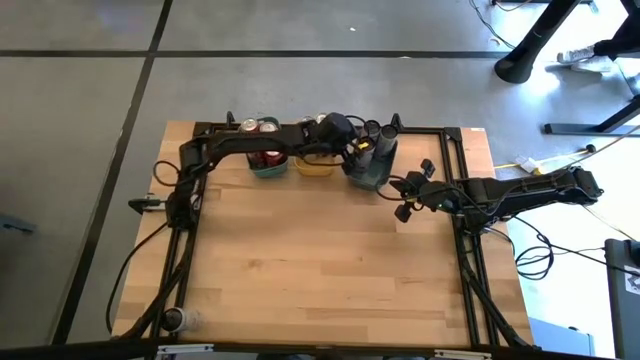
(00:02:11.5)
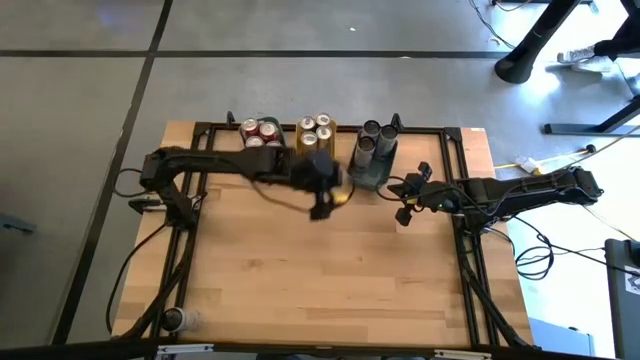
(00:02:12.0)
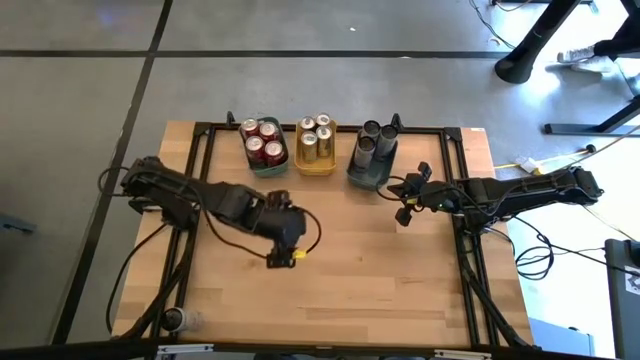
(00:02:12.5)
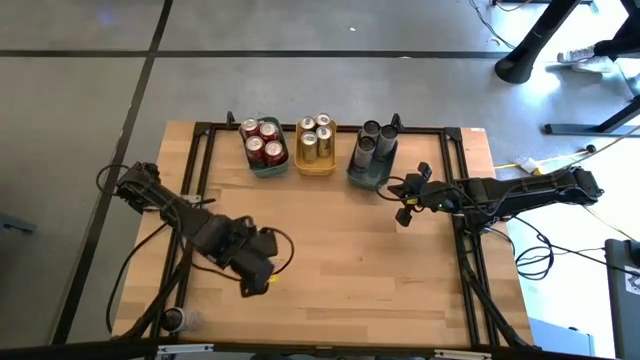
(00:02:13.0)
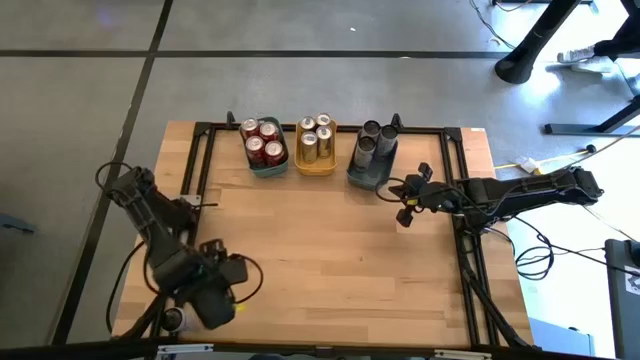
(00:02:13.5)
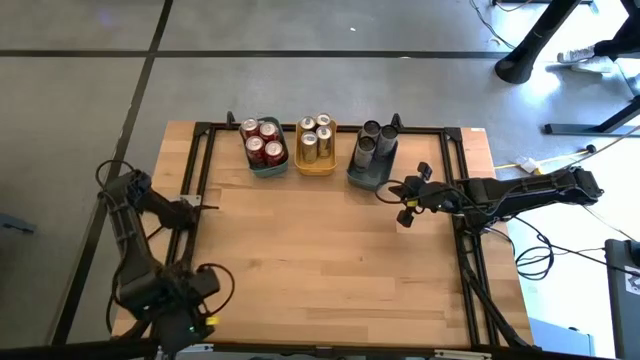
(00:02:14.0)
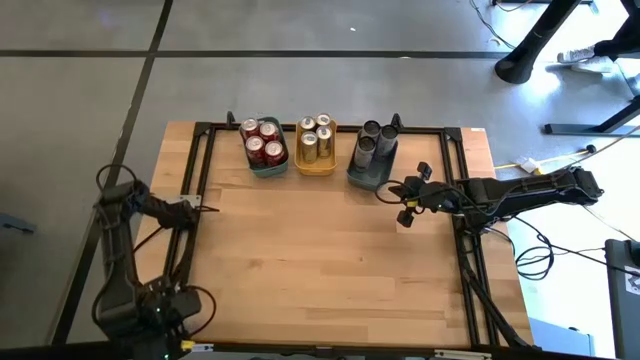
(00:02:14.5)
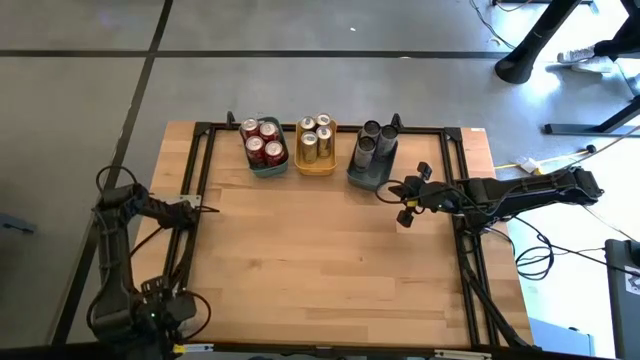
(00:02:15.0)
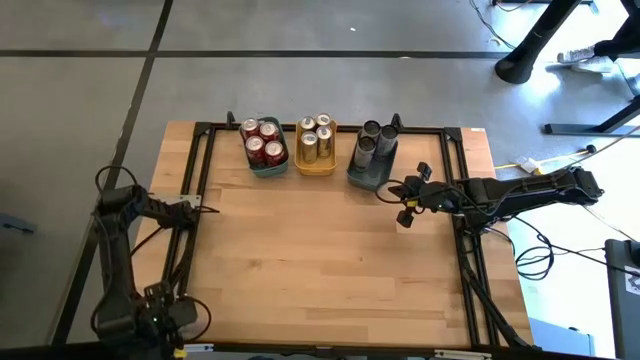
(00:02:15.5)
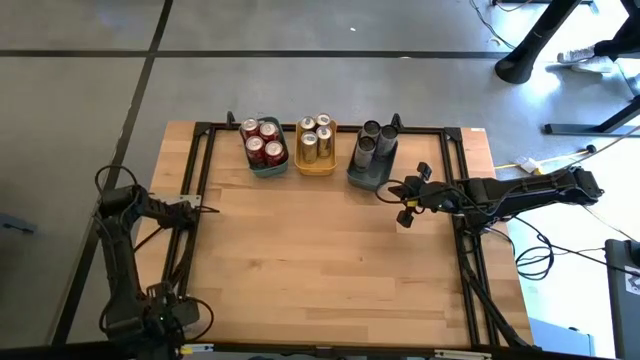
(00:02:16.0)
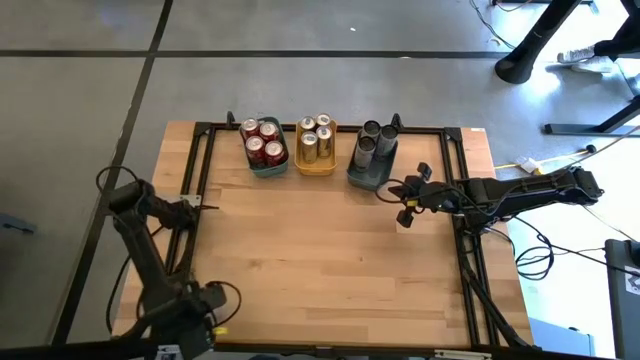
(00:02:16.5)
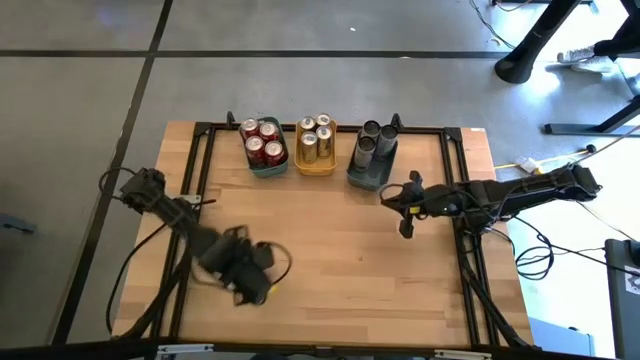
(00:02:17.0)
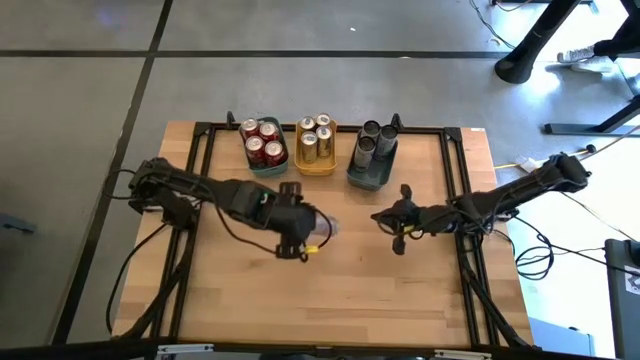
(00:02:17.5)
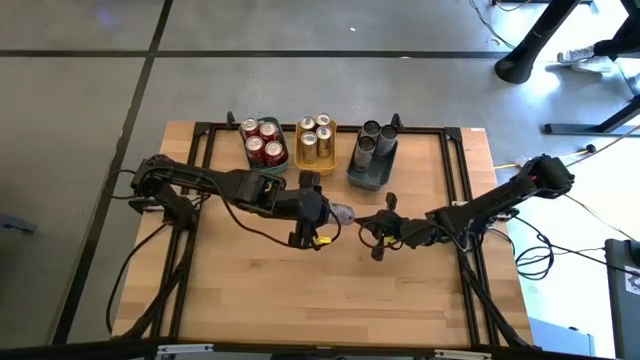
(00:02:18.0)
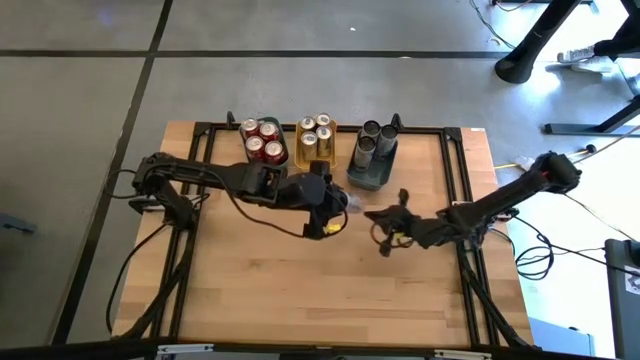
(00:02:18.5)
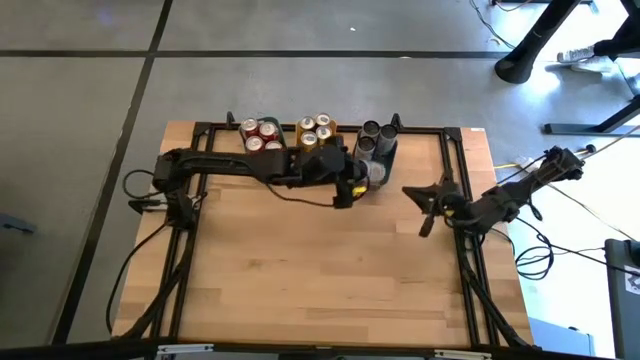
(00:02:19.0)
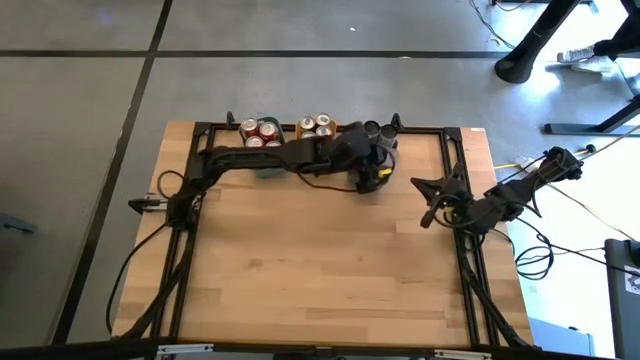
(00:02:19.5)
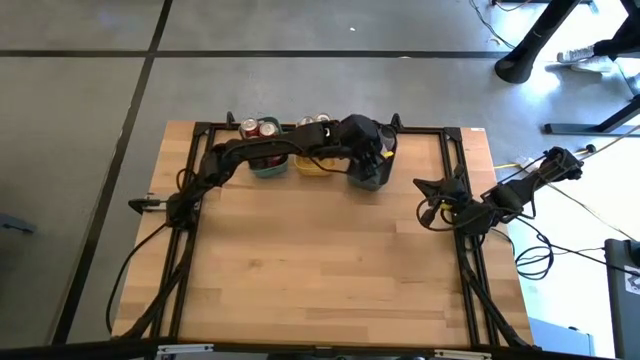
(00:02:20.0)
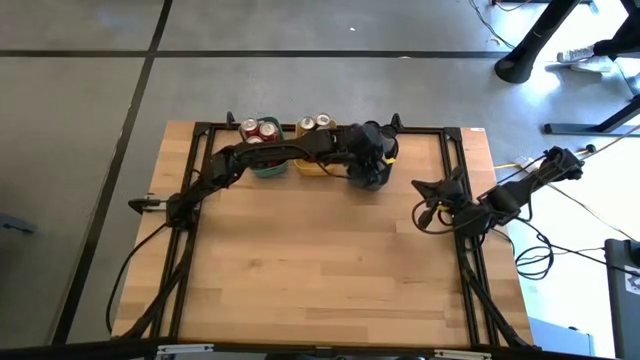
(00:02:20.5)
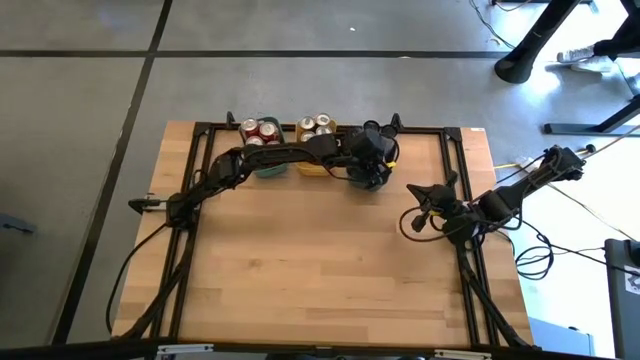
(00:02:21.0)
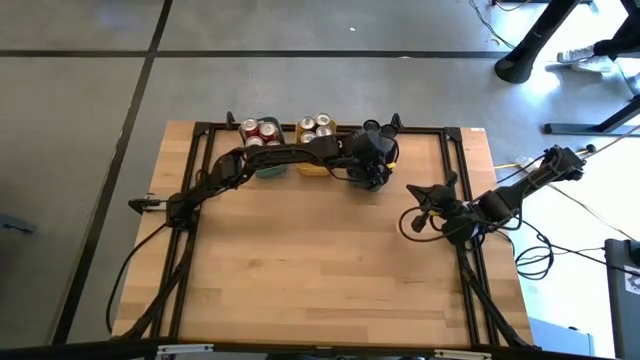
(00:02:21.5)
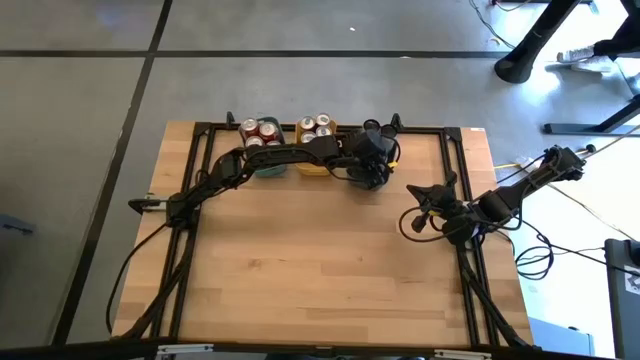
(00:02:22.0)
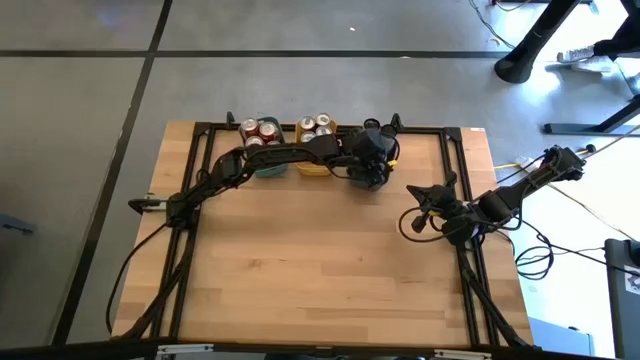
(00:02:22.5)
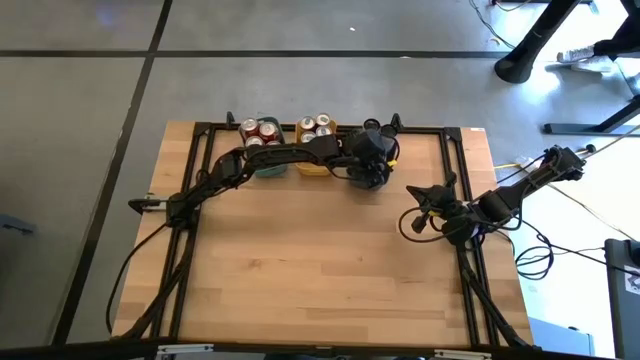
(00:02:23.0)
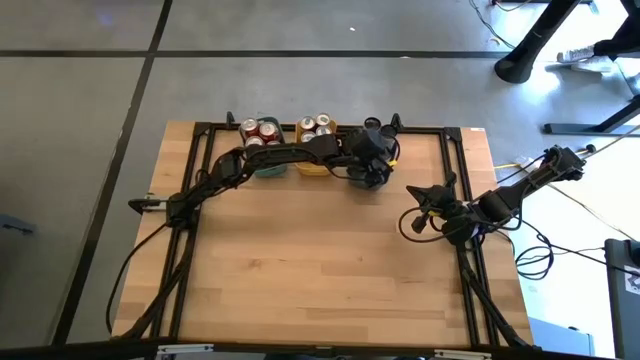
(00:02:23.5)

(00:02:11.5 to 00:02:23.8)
Task: Sort soda cans
Put the white-pink soda can into the blue bin

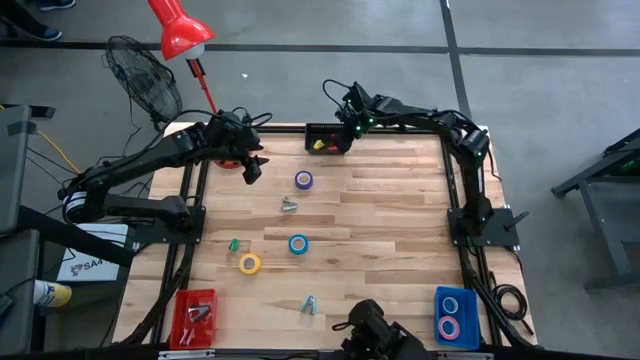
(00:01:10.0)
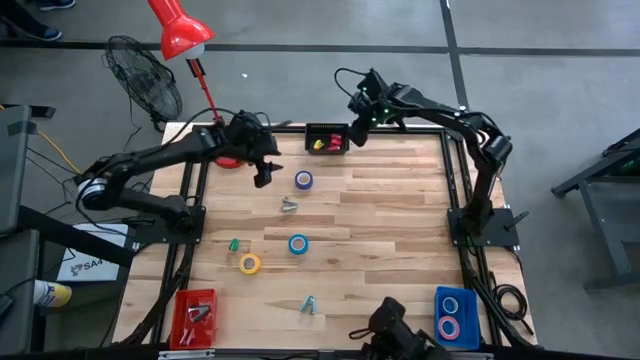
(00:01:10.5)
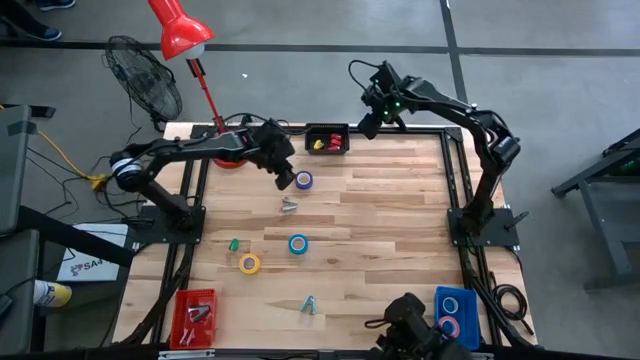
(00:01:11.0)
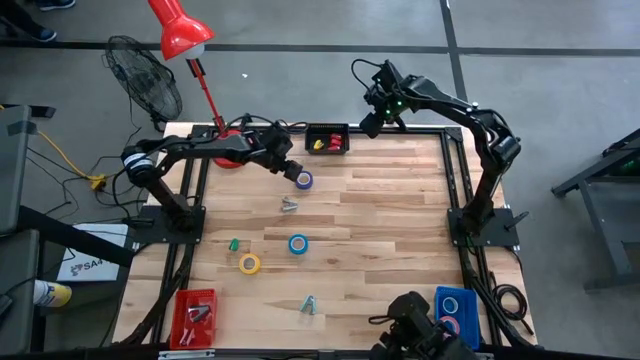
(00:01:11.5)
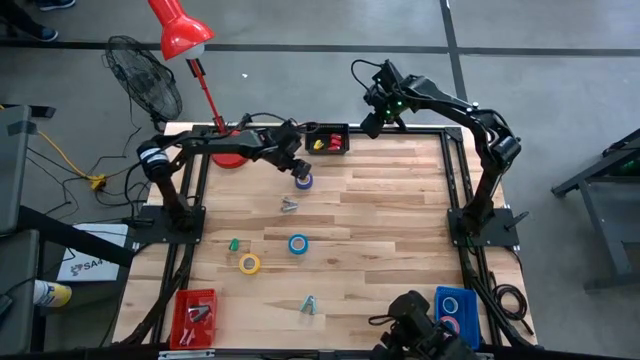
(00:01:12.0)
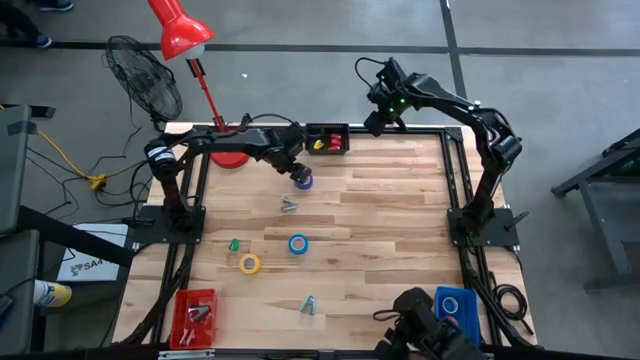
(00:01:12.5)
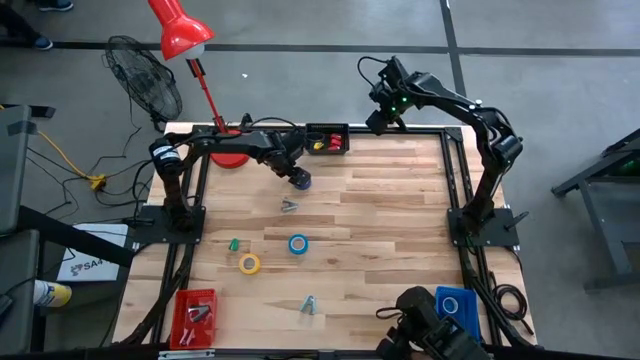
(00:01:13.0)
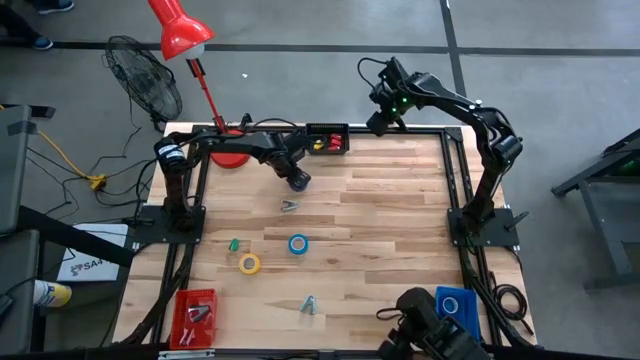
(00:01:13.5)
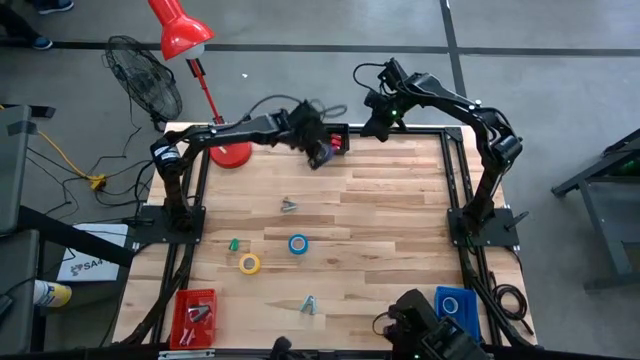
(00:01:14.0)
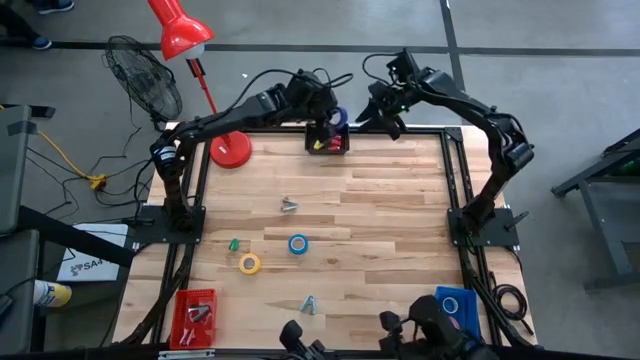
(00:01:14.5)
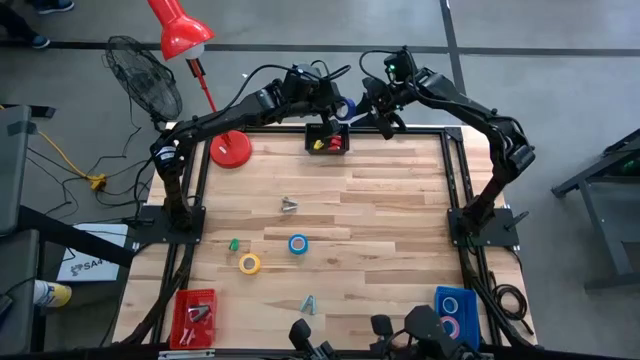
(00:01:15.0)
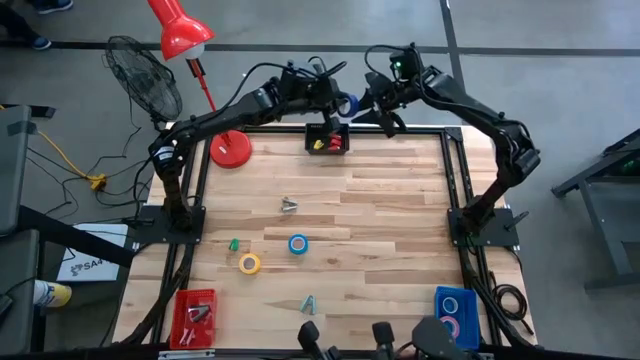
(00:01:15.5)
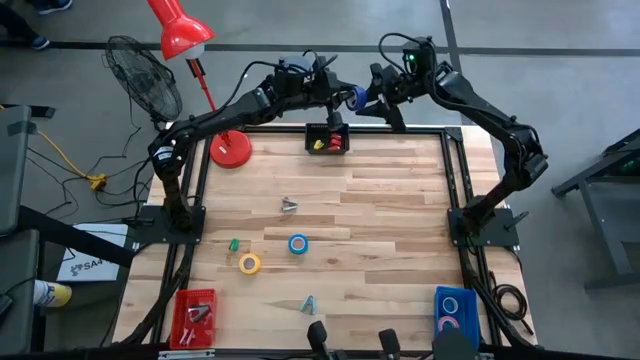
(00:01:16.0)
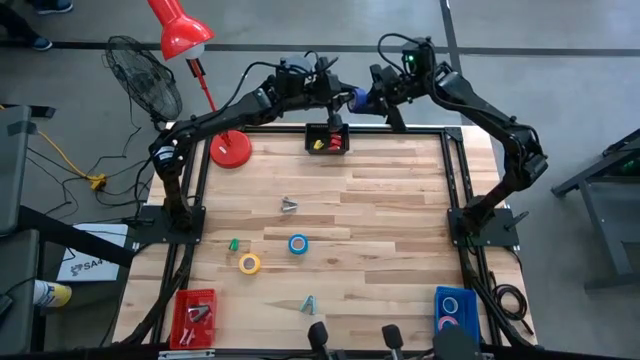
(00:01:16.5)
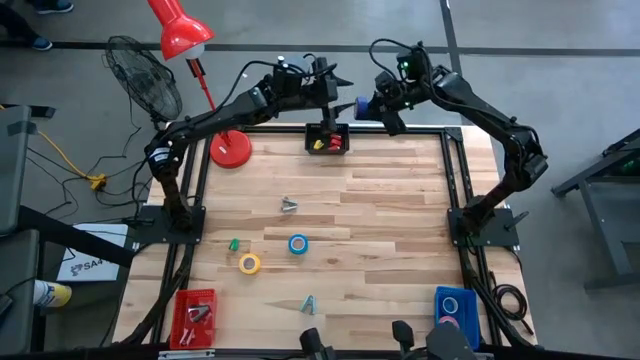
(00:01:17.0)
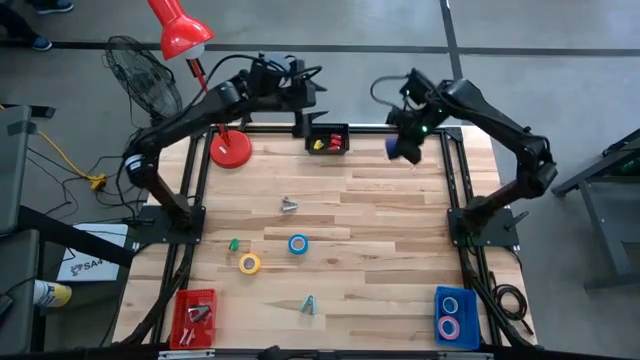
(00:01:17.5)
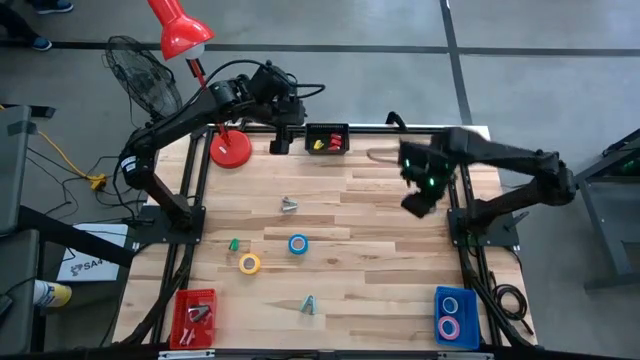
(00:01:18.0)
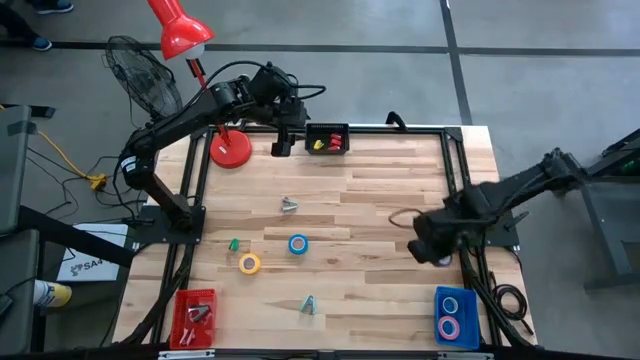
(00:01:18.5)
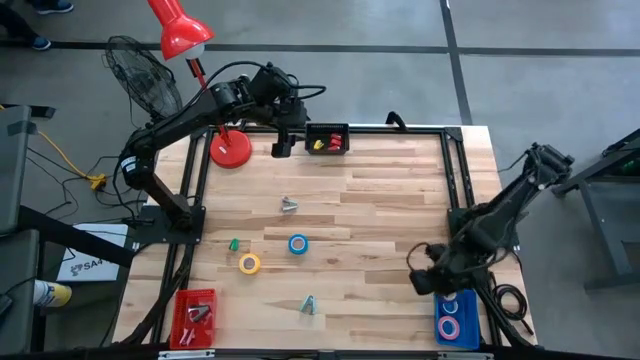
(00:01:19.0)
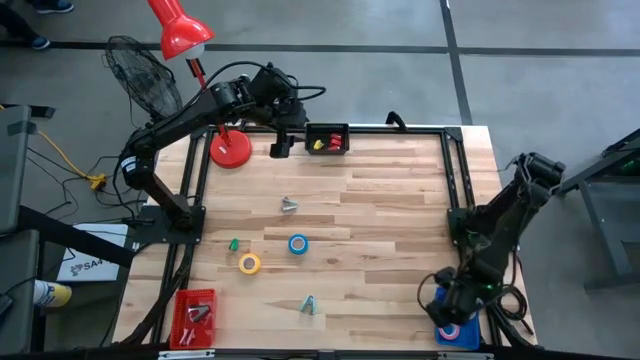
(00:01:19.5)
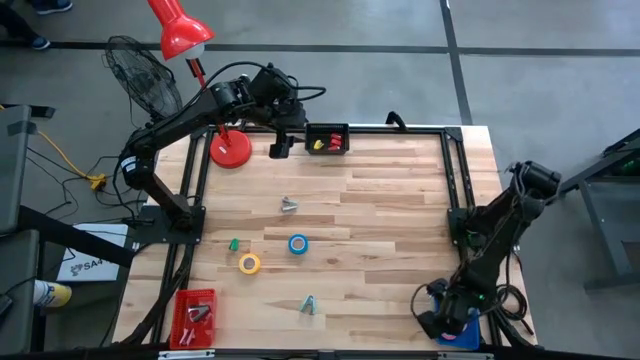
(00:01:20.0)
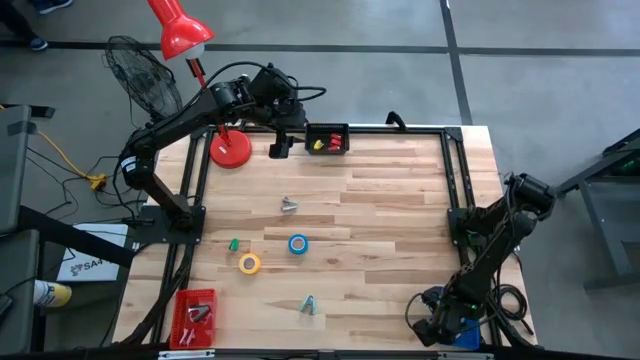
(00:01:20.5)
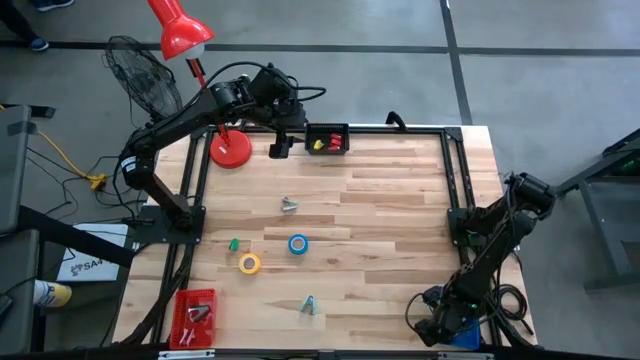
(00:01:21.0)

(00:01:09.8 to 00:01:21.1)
Task: Pick and place Stapler, Stapler remover, tape
Put the violet tape into the blue basket
